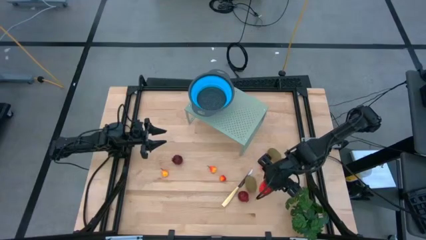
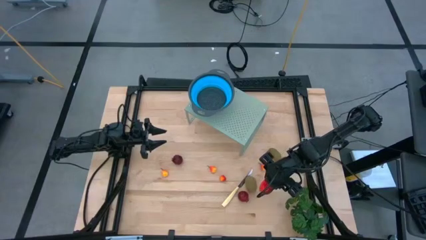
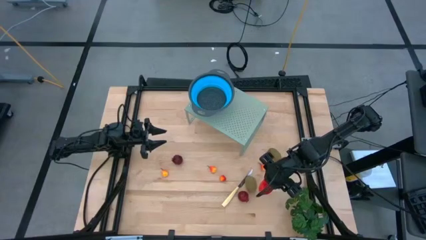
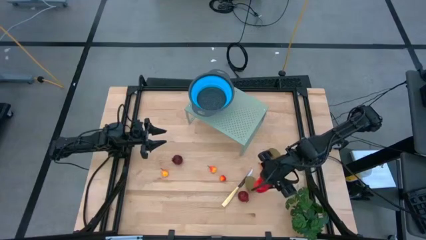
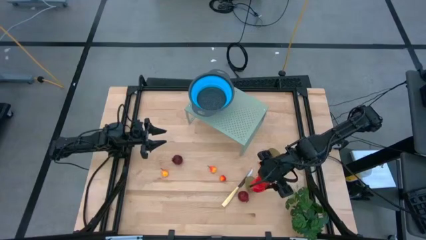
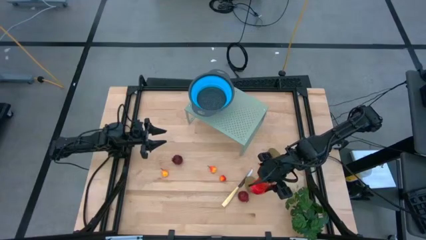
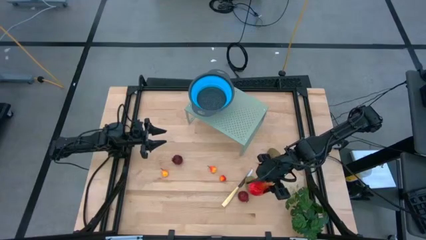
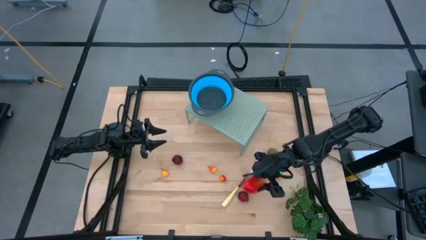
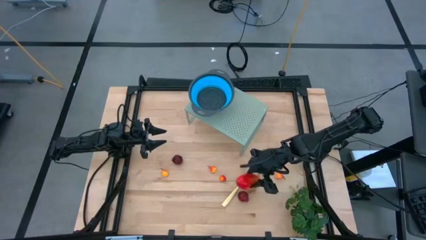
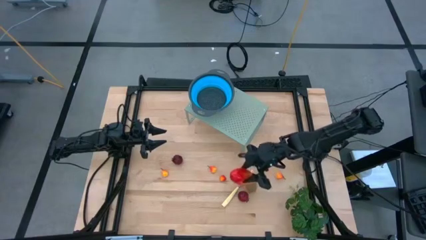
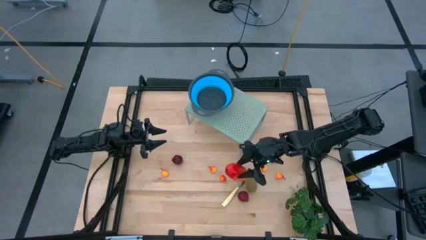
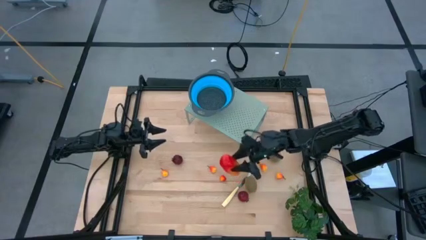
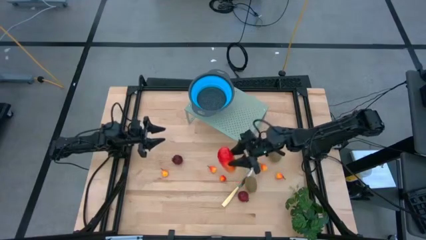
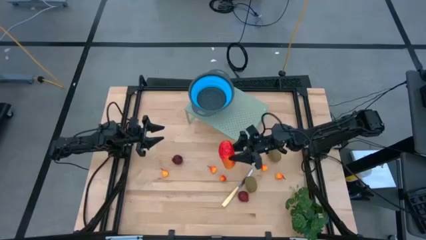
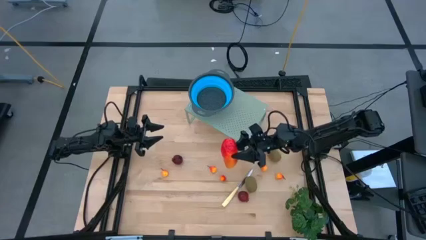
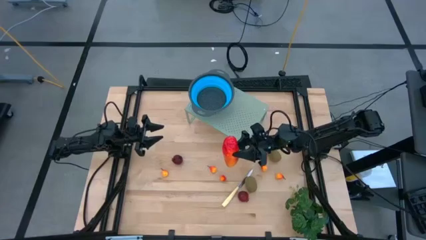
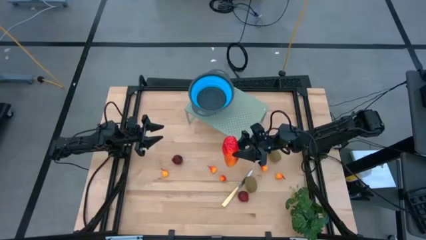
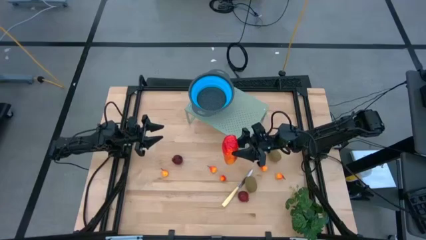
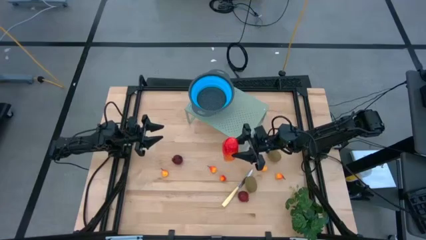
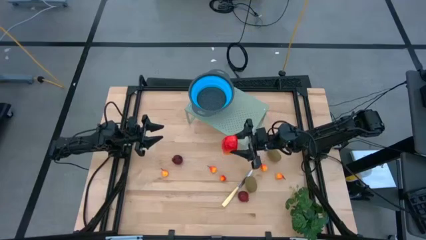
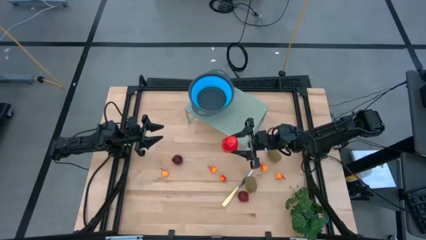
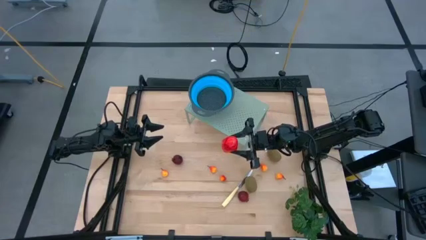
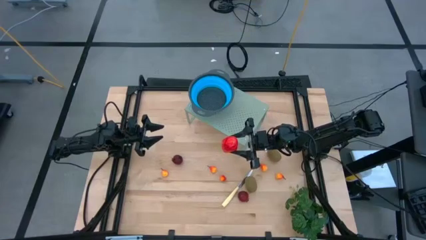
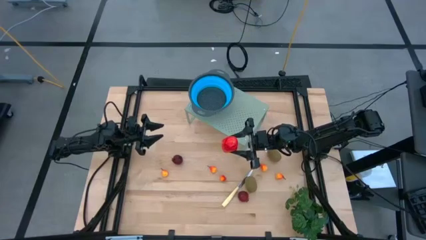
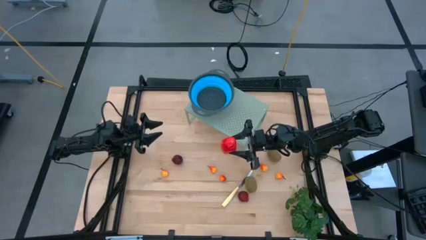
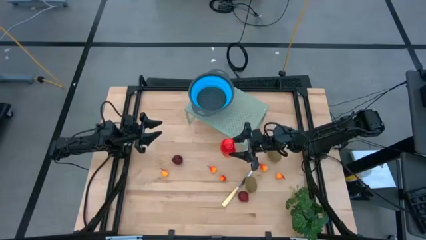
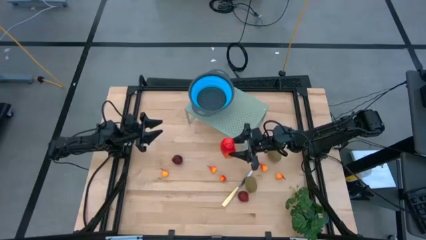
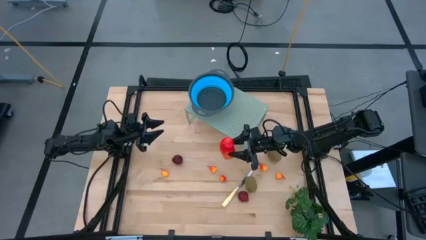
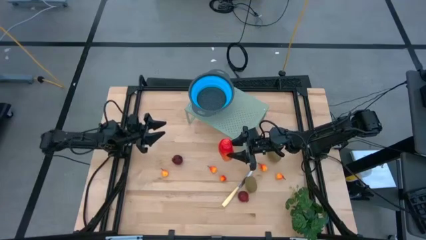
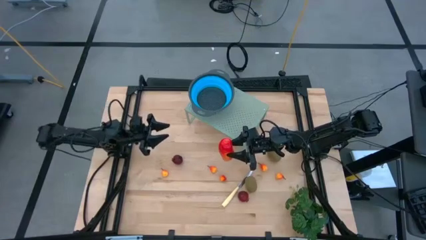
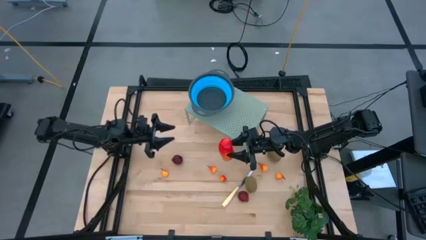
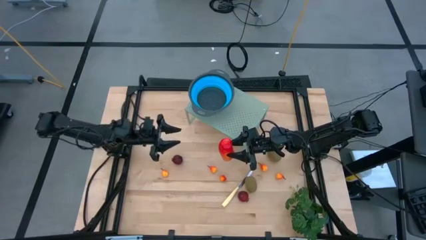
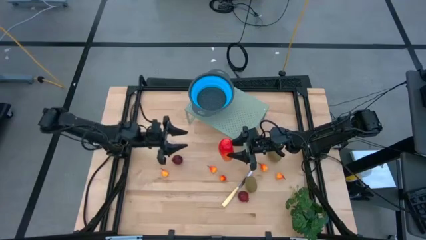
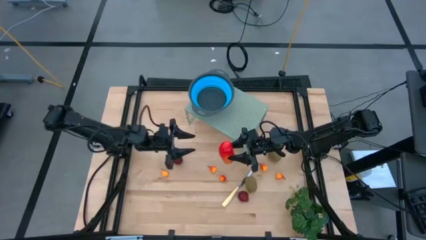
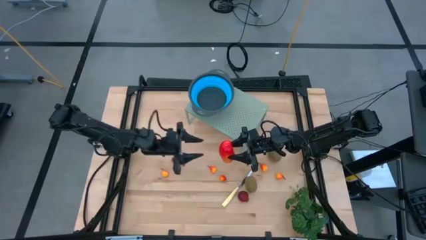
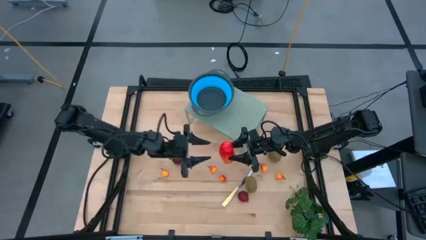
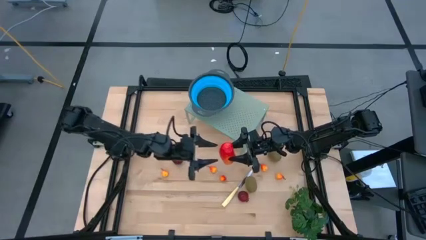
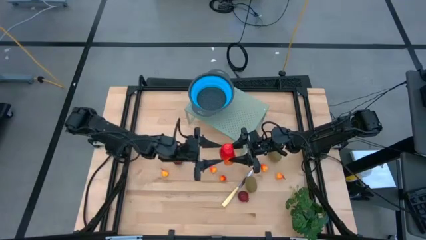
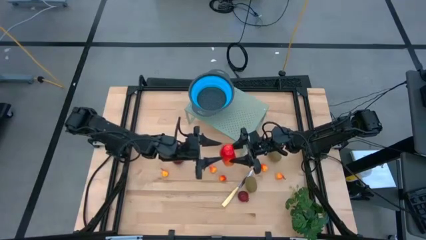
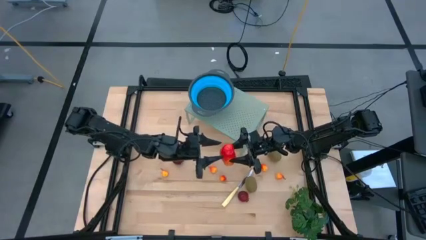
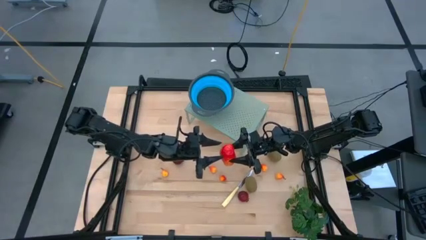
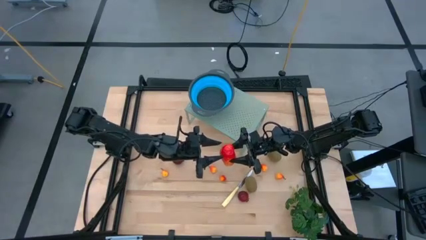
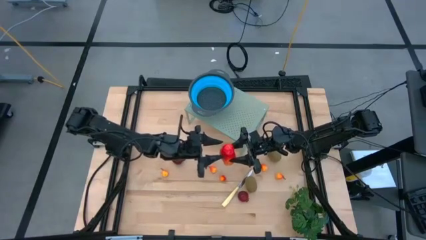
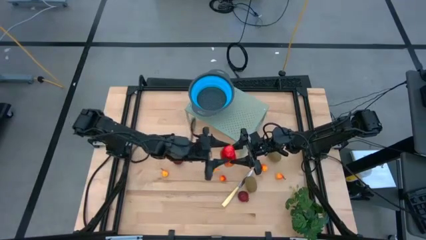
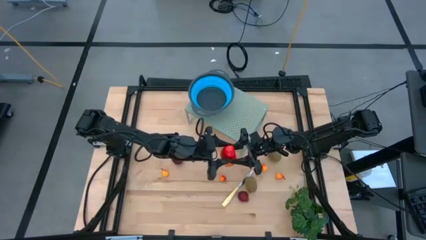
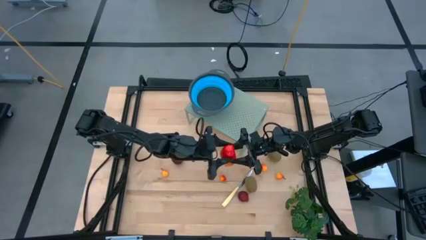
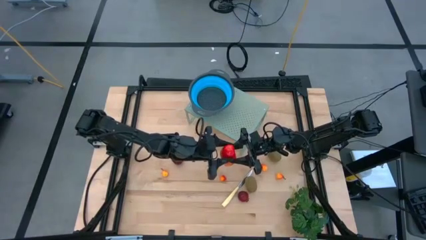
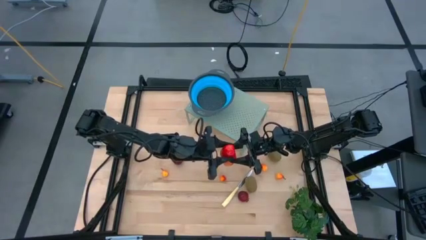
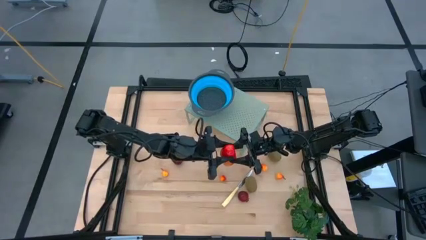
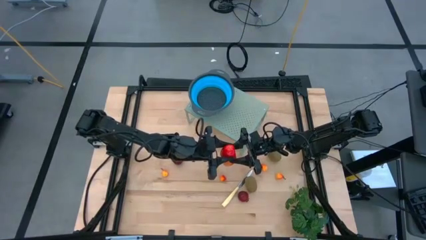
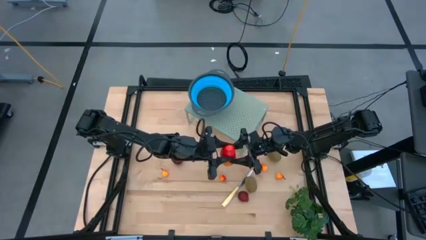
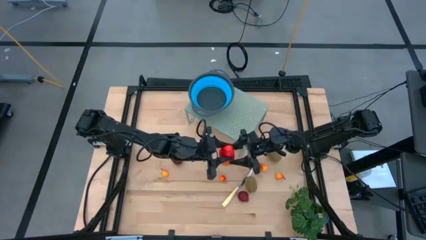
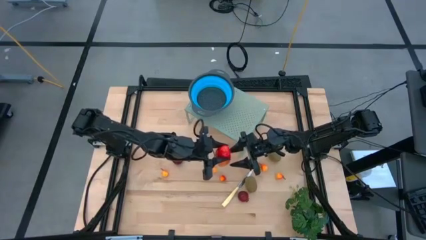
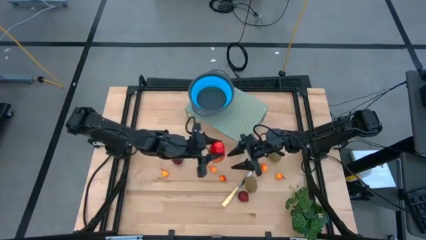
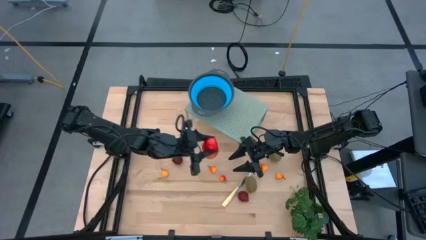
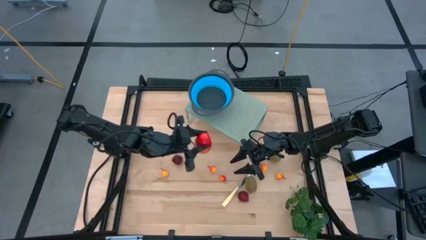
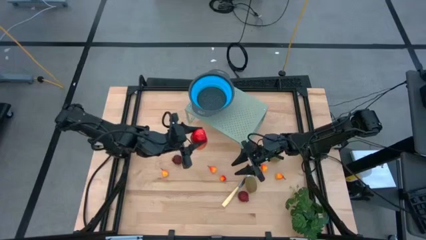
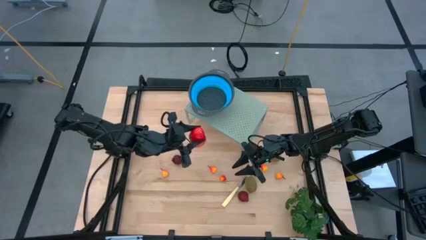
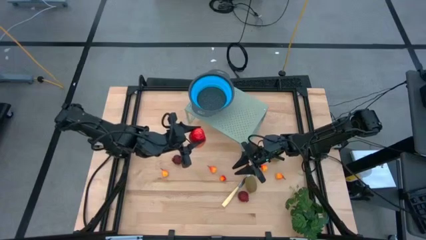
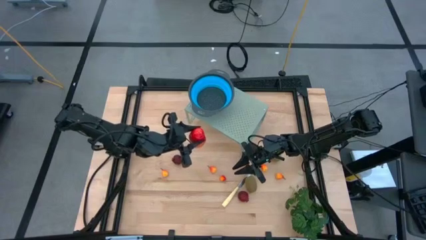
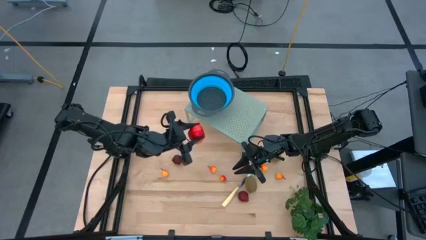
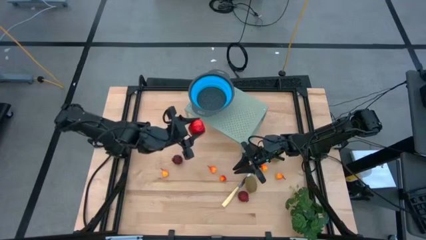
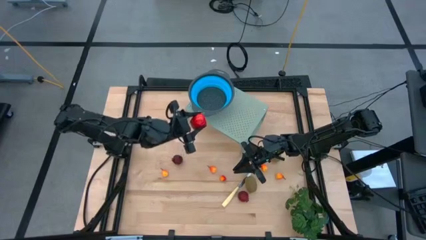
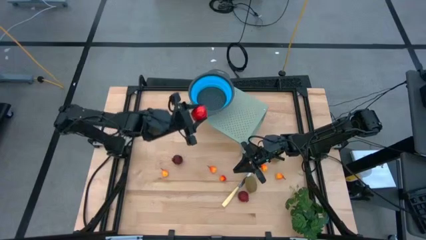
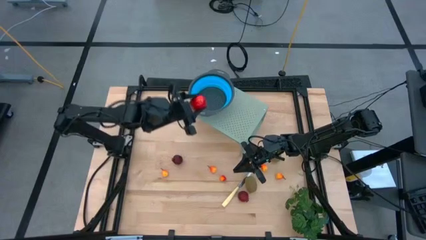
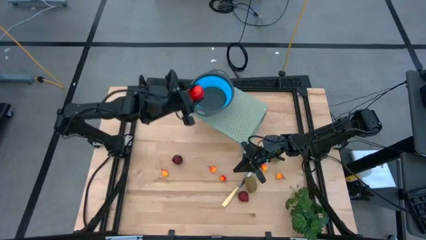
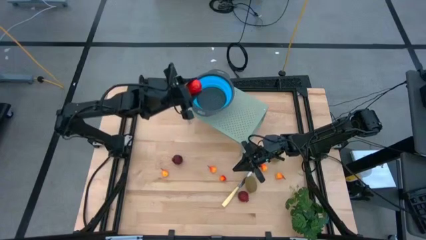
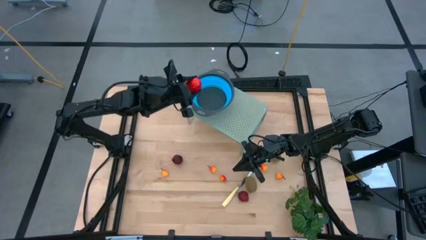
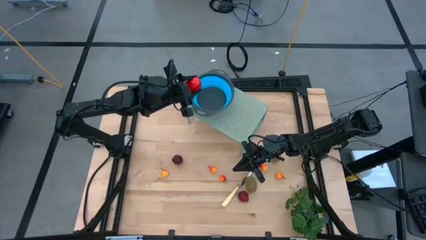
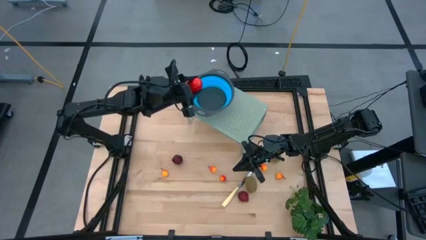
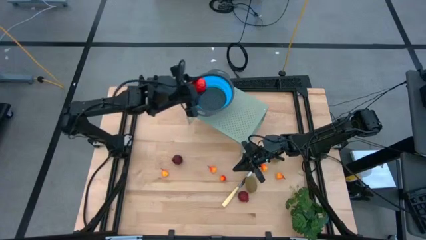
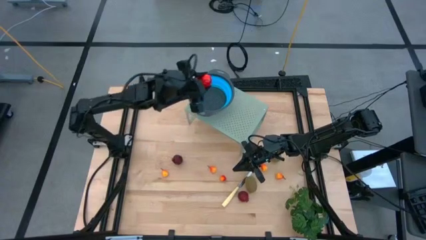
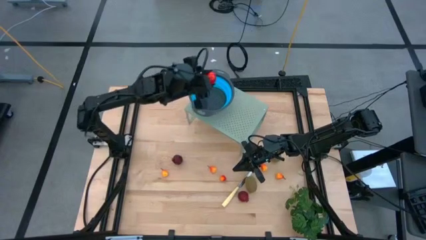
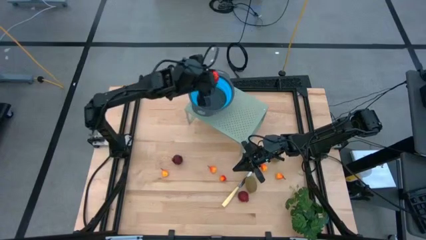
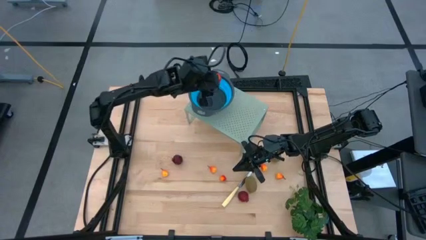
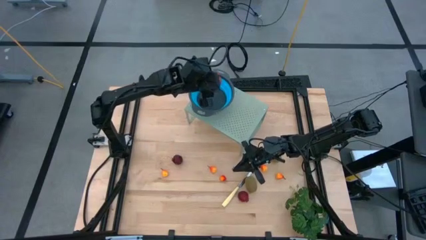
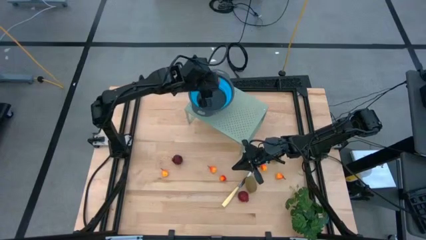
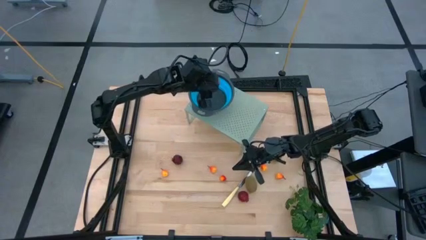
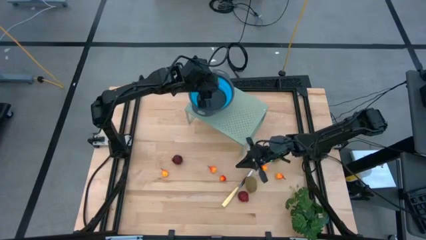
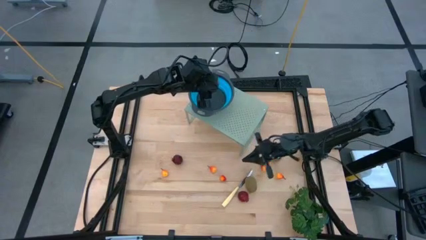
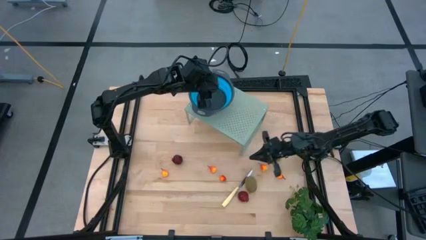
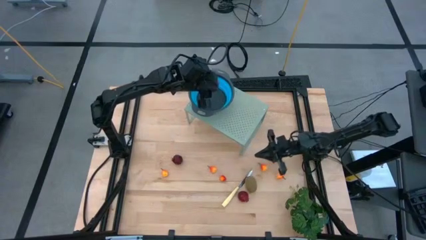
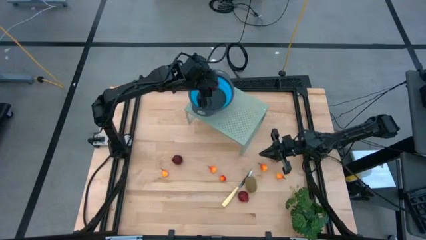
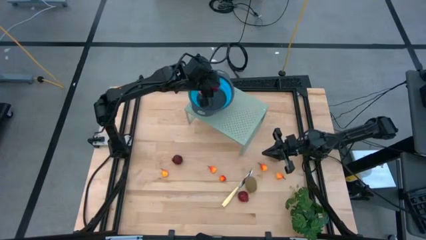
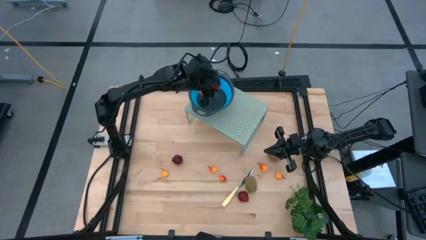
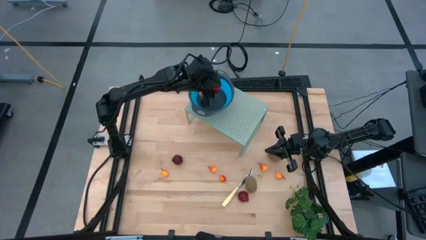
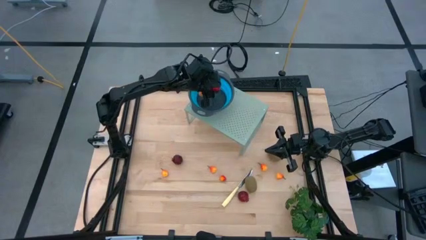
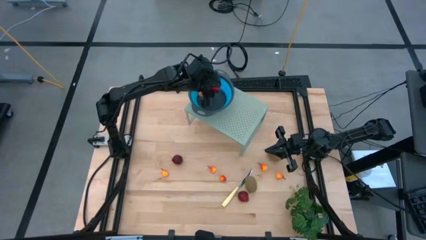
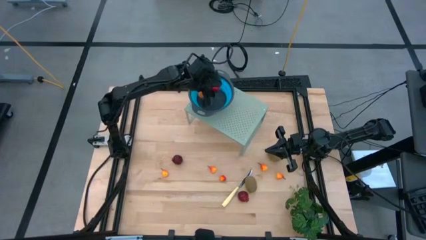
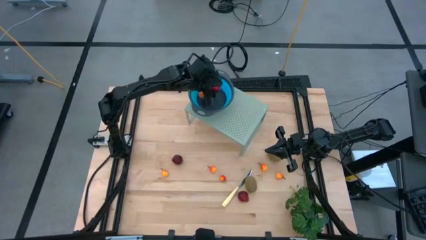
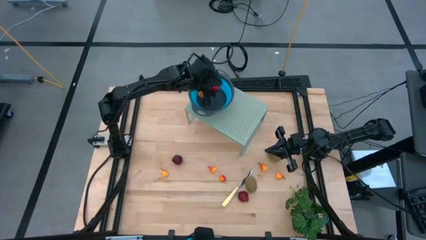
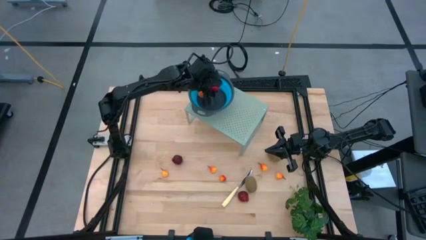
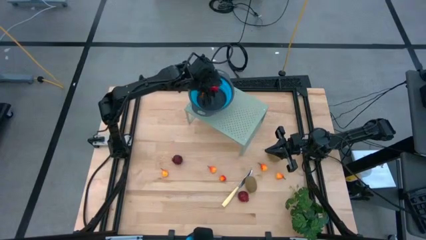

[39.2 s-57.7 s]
Task: Pick & Place Fruit
Put the mango into the blue strainer bowl on the shelf
